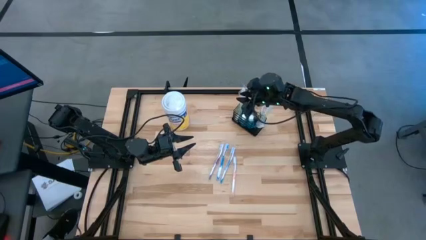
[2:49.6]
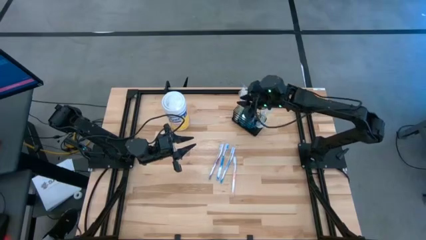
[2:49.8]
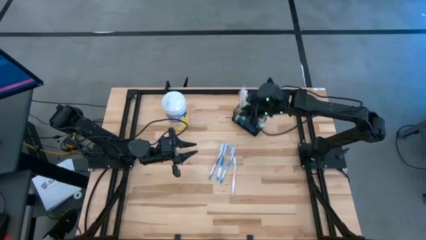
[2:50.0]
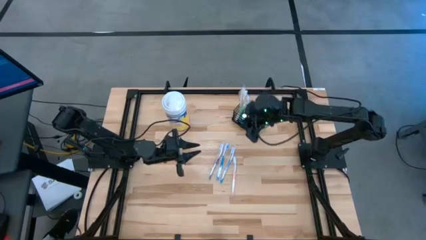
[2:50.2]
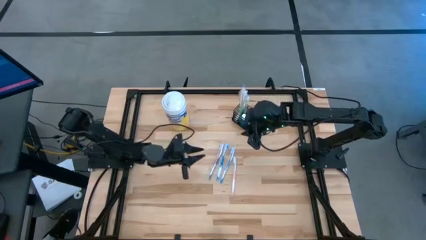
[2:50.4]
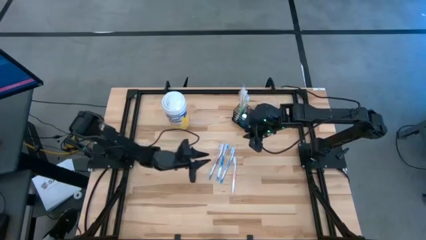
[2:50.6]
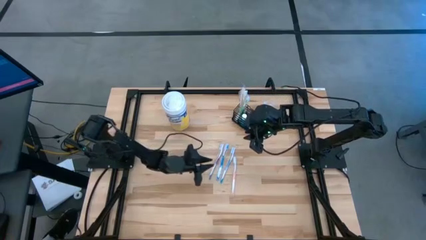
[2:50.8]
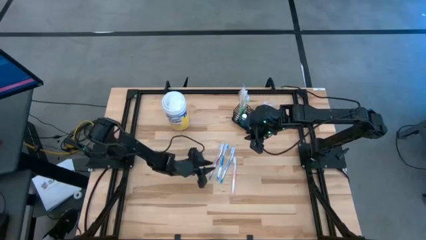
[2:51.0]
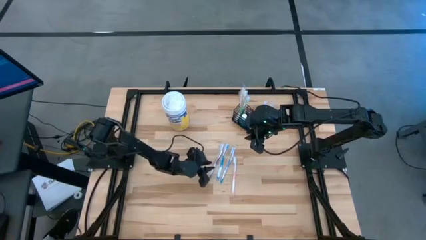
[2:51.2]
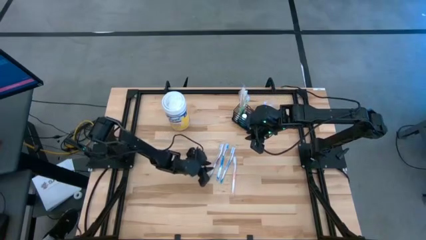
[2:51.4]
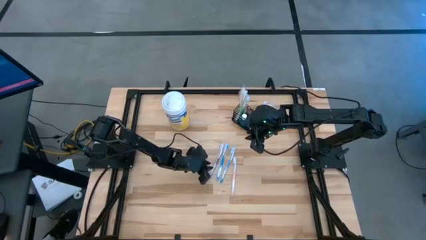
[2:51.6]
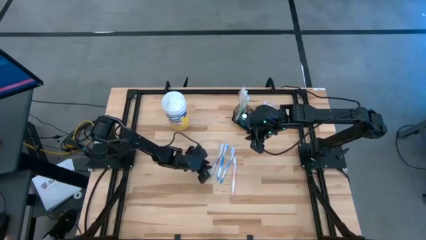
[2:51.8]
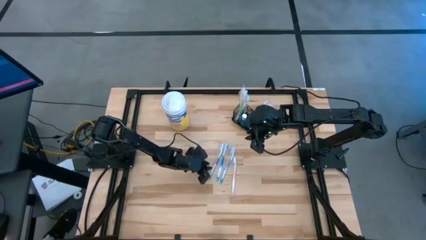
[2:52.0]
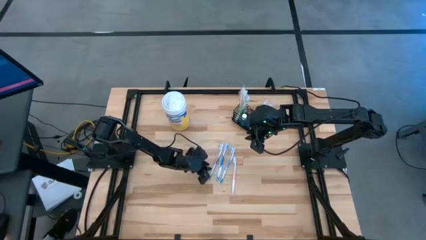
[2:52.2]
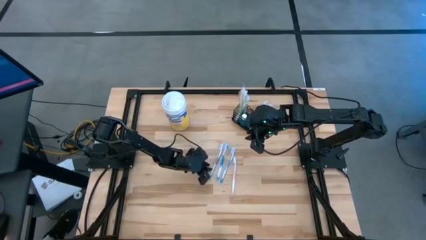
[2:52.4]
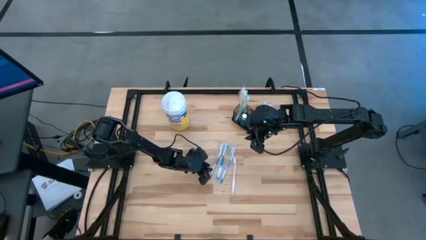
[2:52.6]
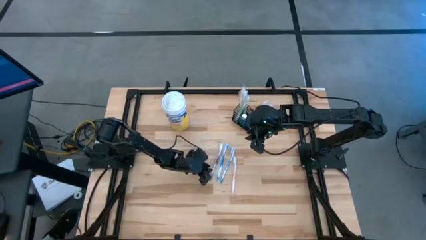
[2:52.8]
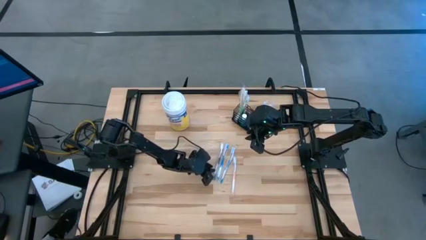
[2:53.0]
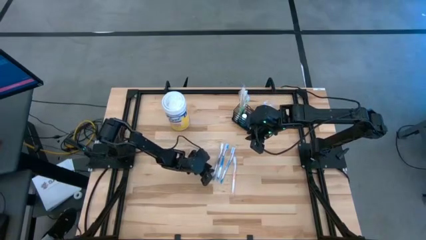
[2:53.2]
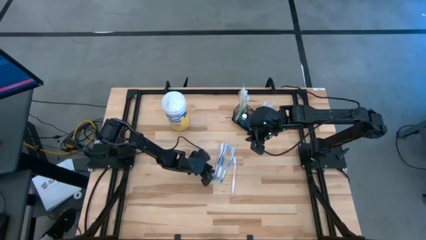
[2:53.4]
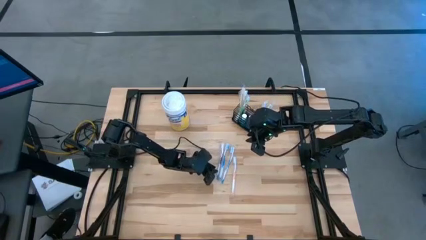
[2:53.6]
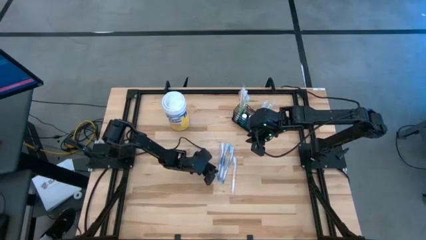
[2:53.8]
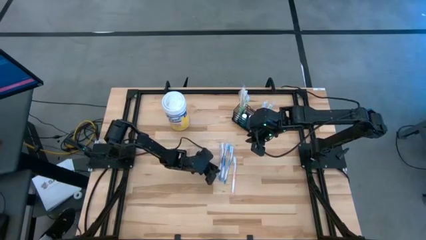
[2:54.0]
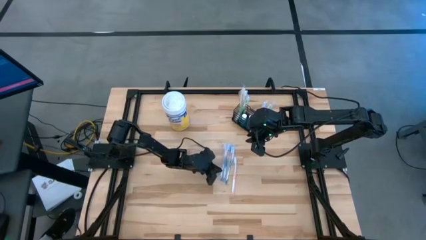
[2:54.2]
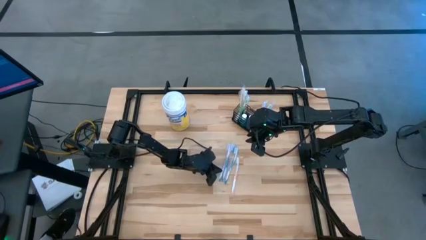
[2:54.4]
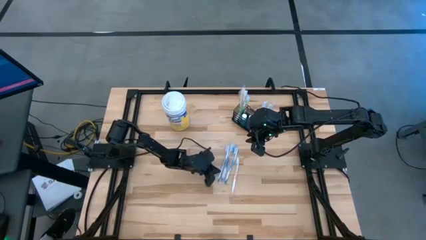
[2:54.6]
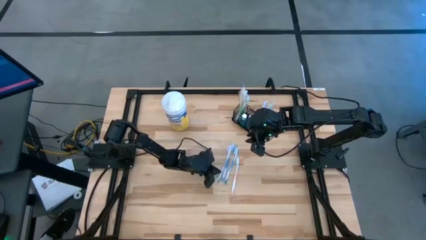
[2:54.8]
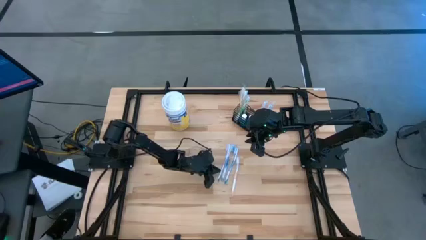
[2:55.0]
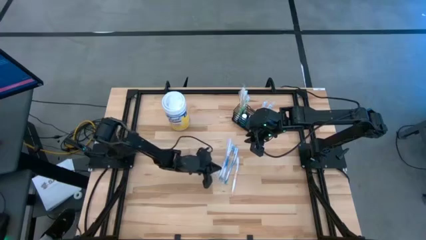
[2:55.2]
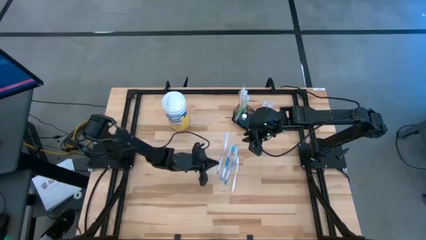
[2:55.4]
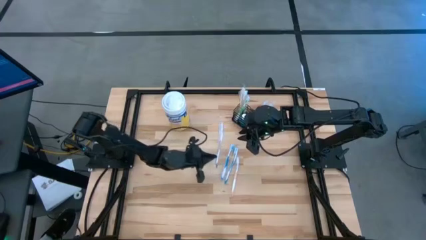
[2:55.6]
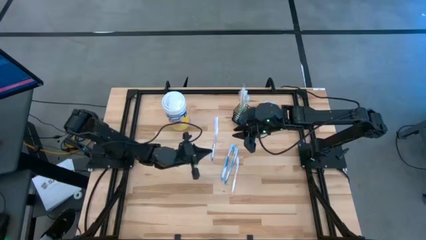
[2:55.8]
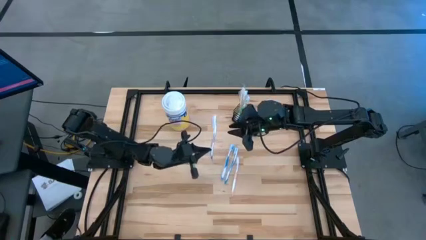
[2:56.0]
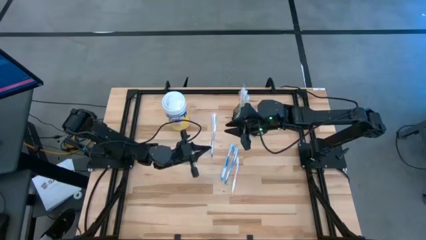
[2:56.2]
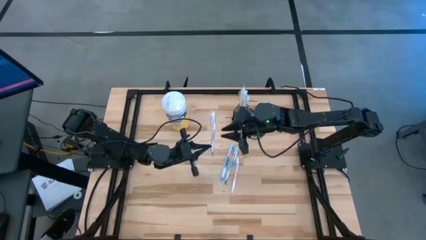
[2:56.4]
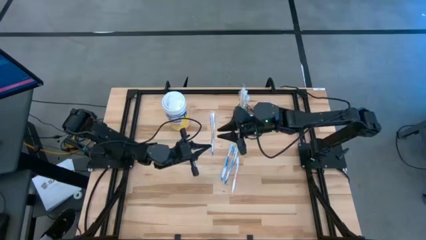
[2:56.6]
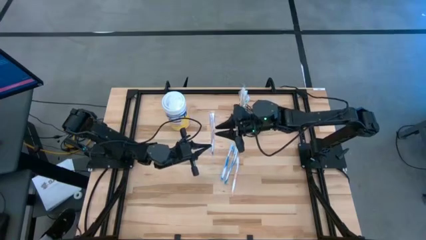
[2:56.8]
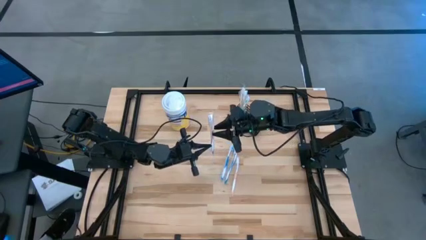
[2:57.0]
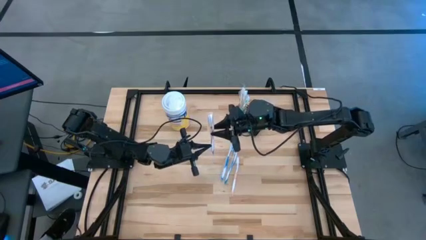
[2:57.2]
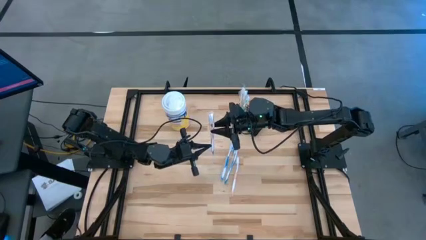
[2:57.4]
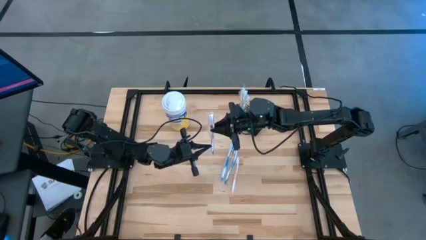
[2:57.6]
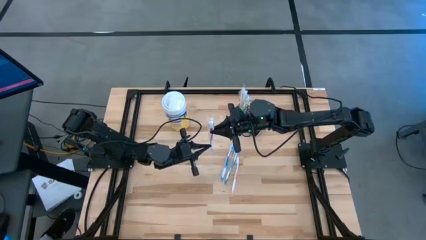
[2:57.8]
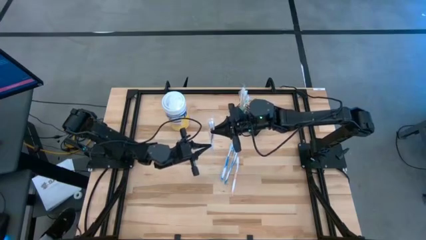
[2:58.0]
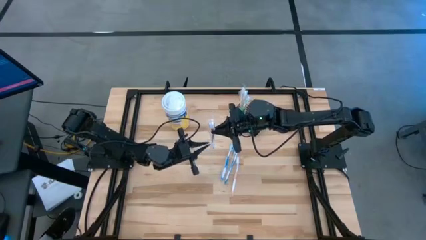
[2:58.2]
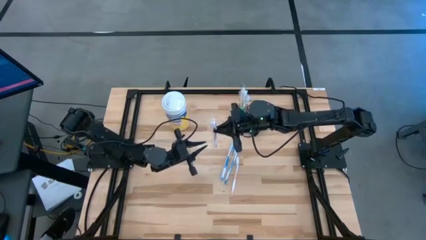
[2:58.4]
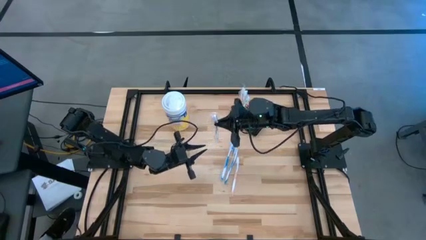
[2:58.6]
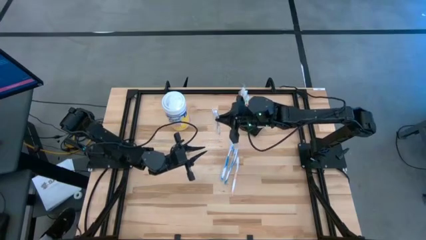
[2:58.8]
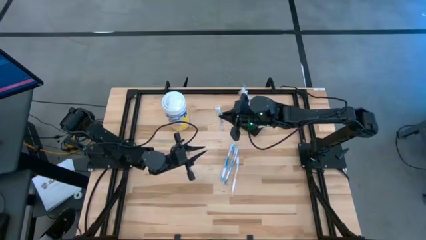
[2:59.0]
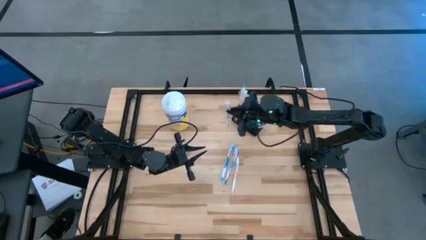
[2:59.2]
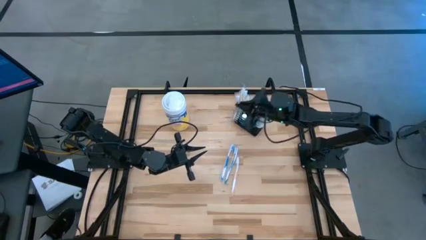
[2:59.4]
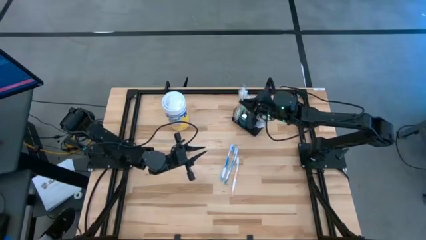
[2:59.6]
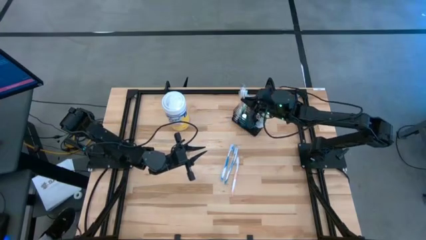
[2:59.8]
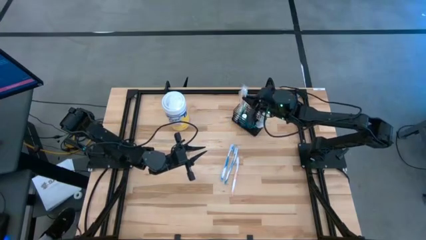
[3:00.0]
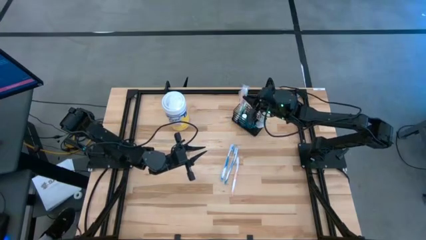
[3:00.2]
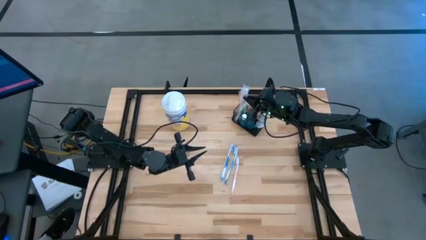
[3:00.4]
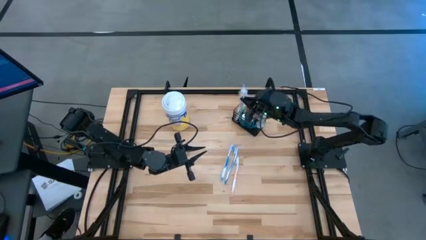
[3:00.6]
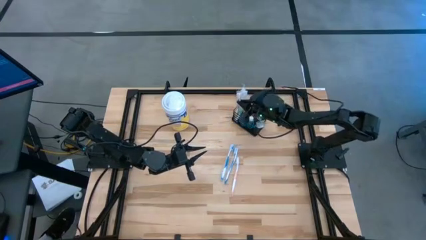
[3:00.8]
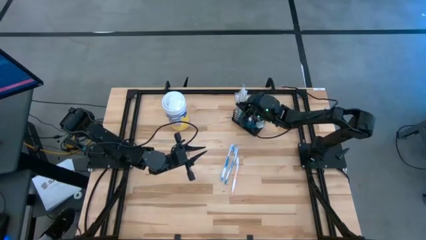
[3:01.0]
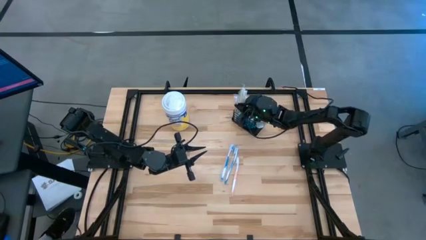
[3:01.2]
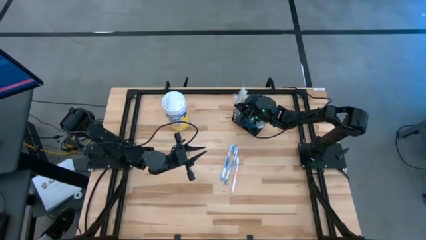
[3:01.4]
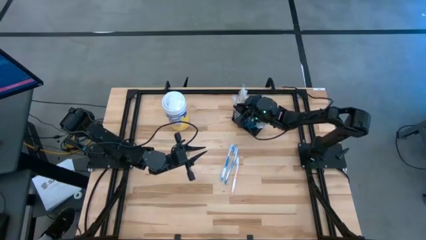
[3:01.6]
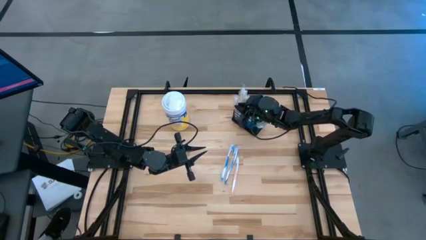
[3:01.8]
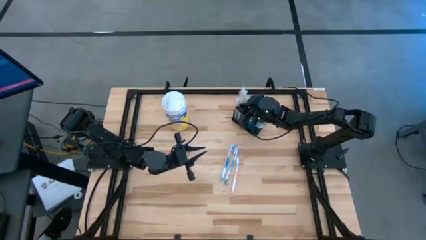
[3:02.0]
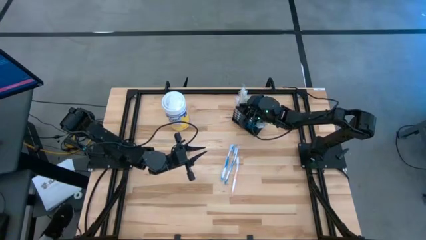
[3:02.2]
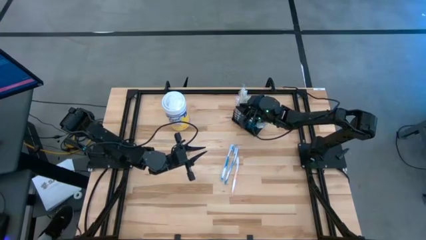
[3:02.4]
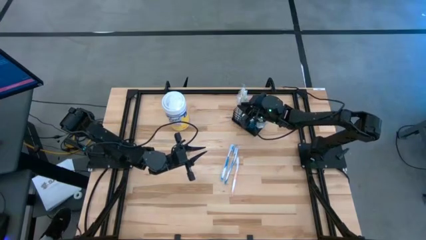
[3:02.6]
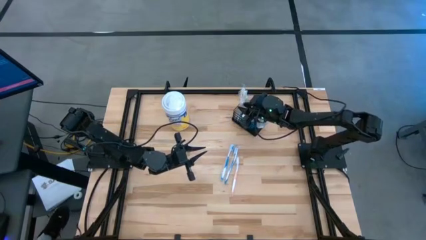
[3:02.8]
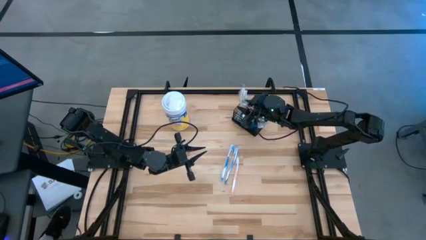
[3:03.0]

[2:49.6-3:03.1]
Task: Pick & Place toothbrushing station
Put the violet toothbrush into the black wire organizer

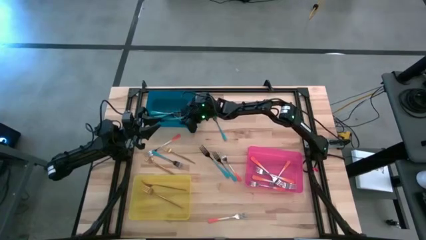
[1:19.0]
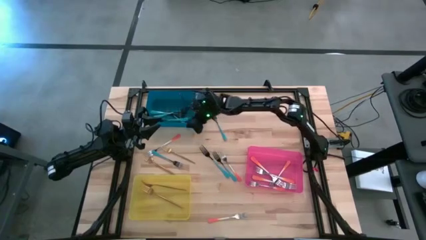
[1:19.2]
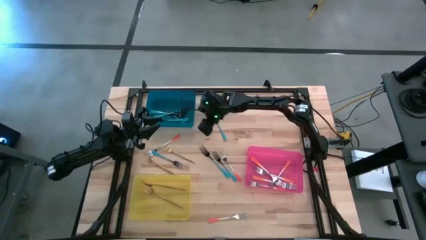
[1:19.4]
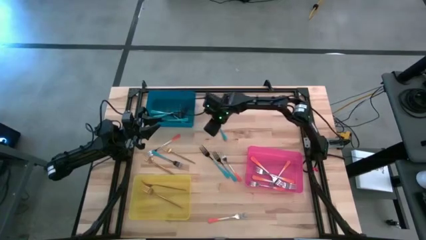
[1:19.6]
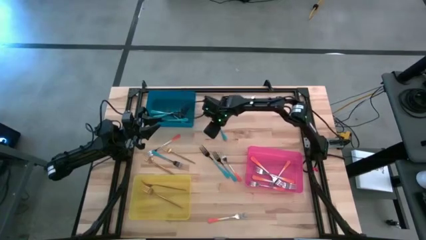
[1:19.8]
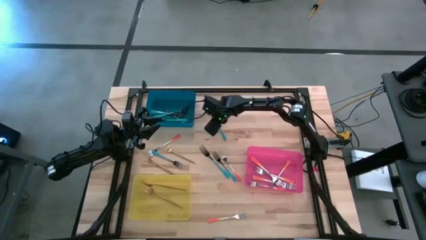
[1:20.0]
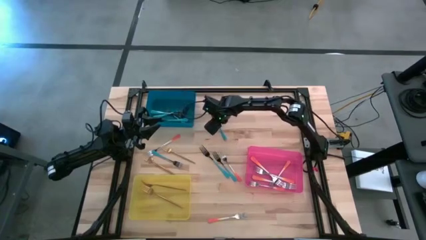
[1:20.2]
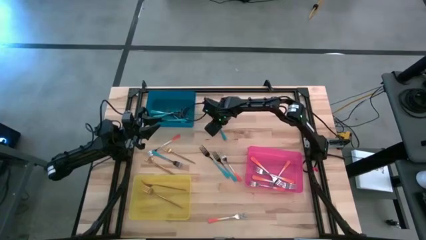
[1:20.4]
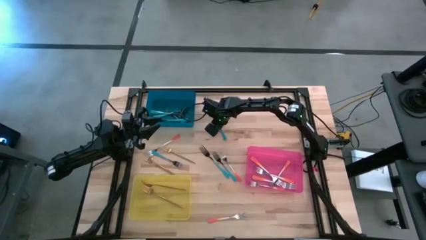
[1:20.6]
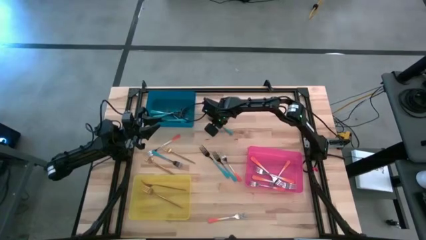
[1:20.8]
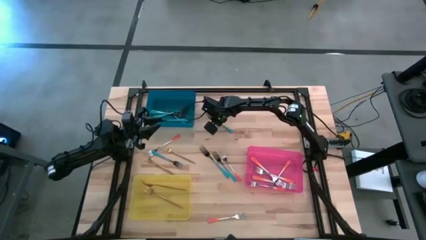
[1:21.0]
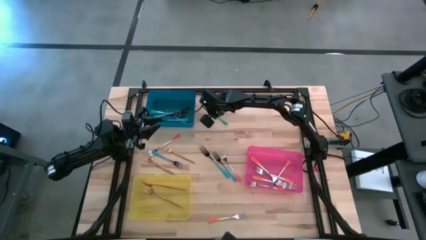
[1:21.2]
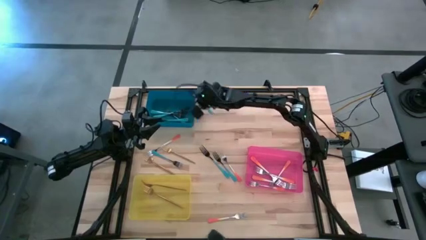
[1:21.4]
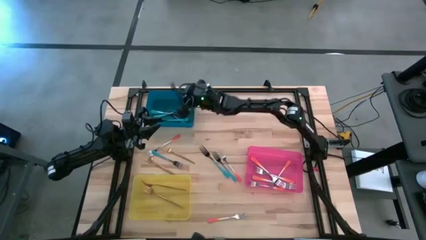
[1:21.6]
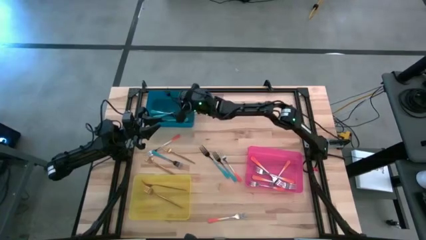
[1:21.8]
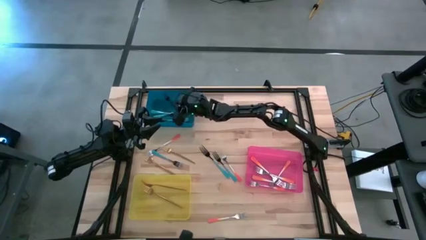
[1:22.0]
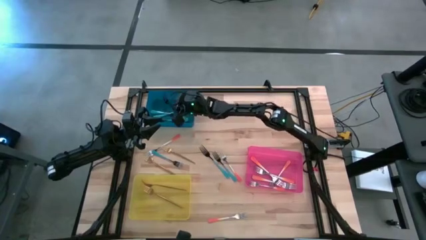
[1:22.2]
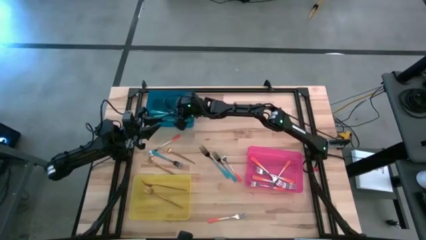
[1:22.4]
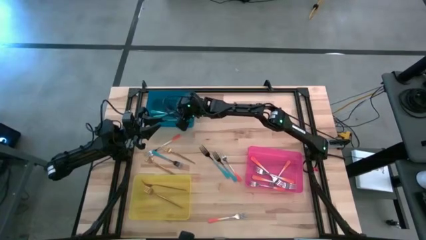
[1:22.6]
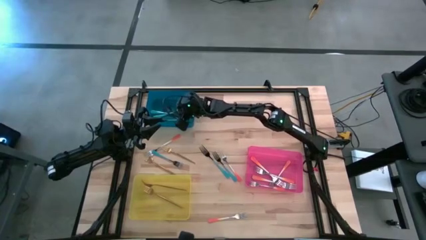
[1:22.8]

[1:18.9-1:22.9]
Task: Sort silverware by color (type)
Put the blue fork into the blue bin
